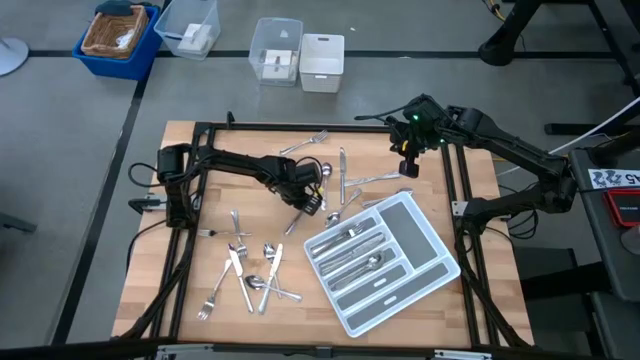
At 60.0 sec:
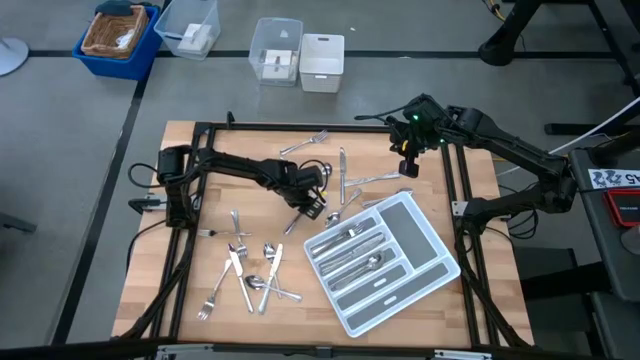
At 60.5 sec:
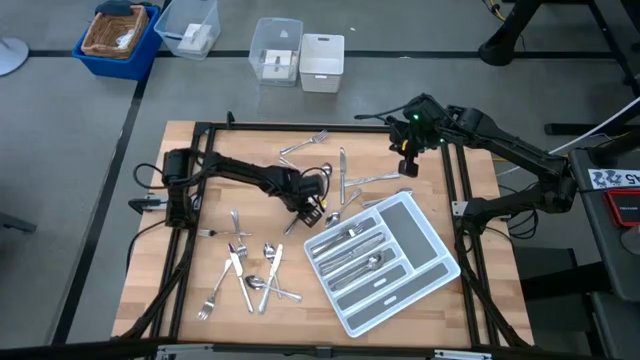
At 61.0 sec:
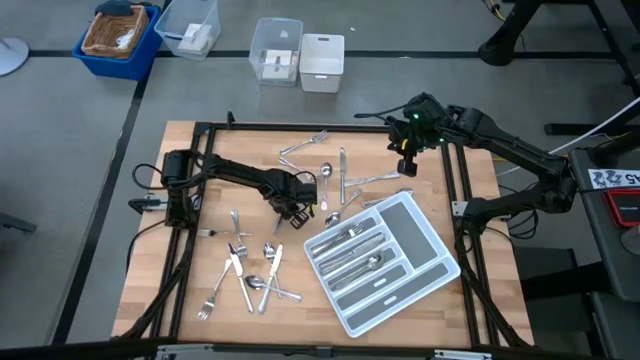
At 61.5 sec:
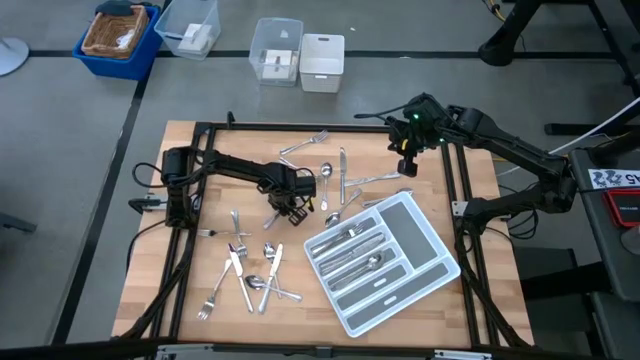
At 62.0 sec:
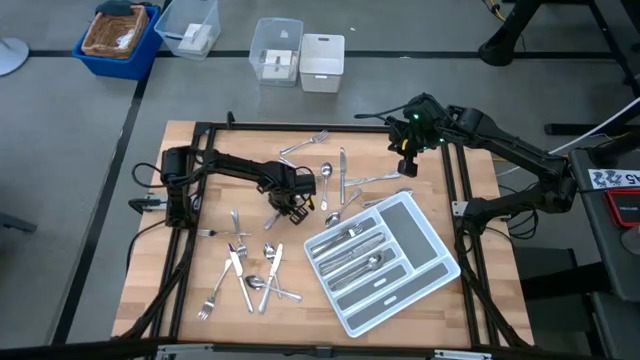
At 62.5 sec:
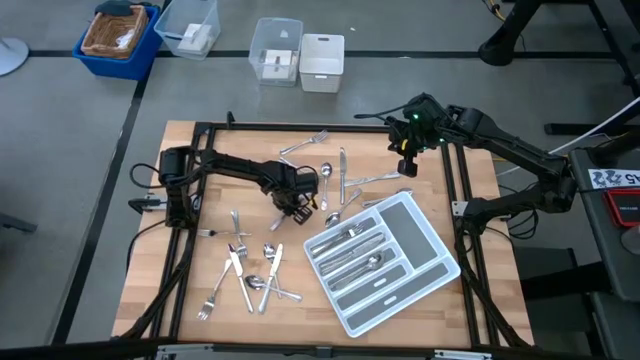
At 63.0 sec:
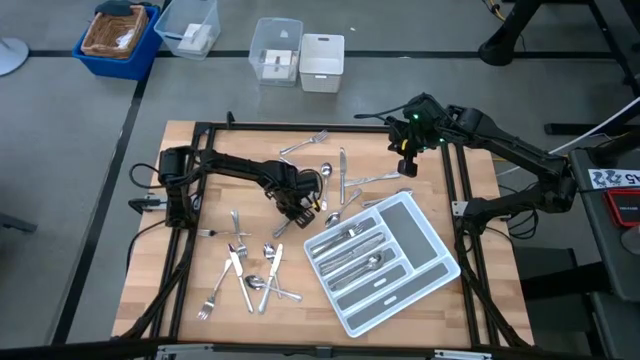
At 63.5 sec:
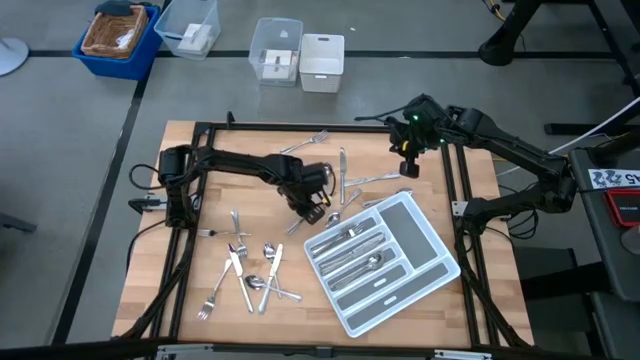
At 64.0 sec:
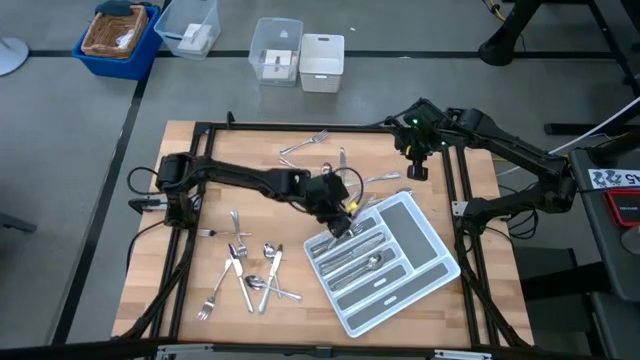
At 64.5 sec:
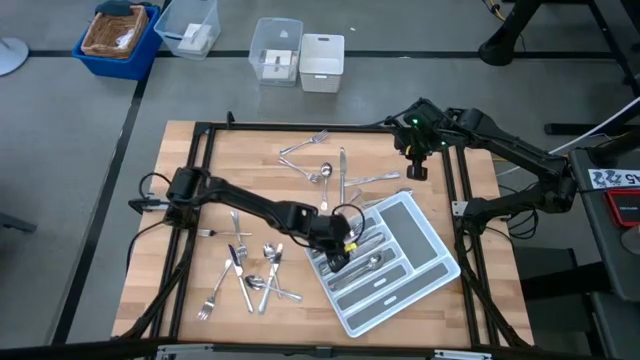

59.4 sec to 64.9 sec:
Task: Sort silverware
Put the silver table knife into the silverware tray

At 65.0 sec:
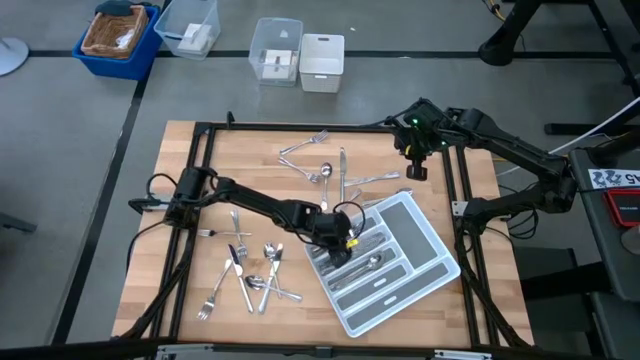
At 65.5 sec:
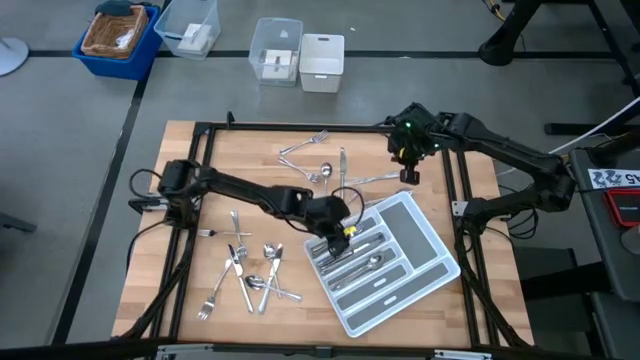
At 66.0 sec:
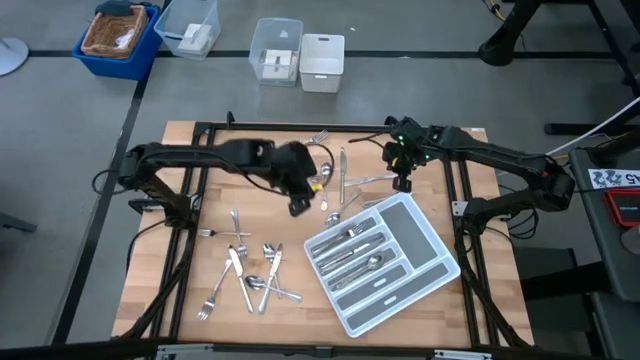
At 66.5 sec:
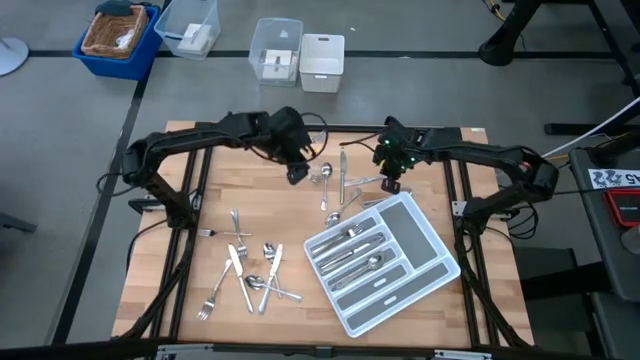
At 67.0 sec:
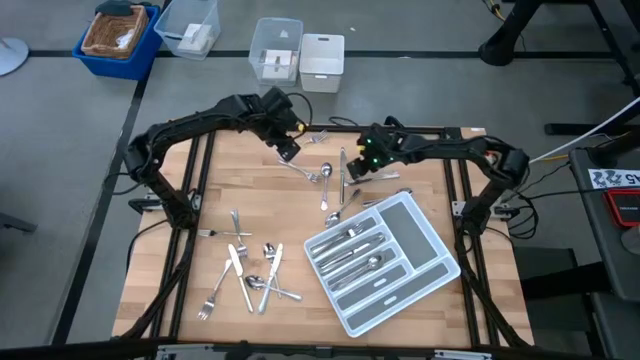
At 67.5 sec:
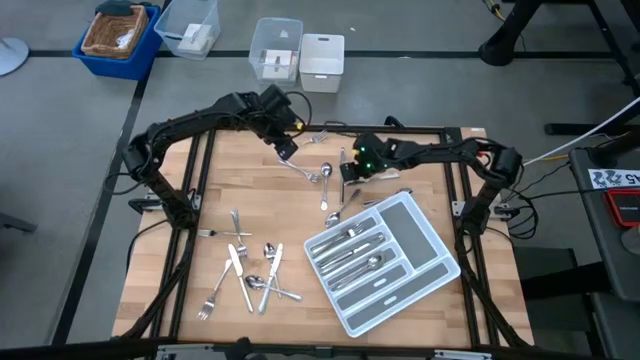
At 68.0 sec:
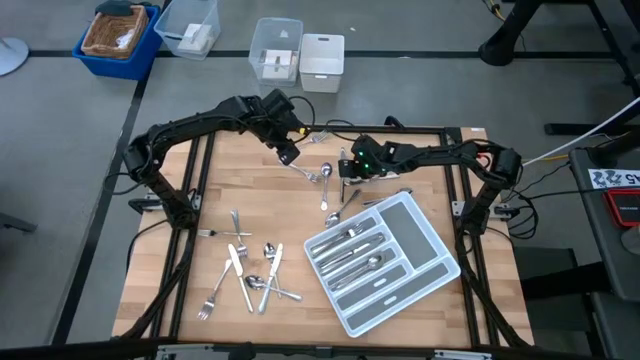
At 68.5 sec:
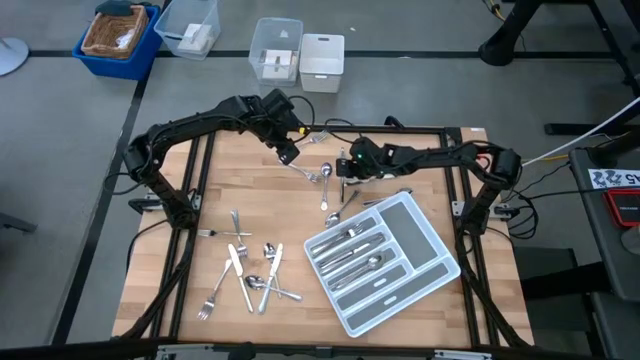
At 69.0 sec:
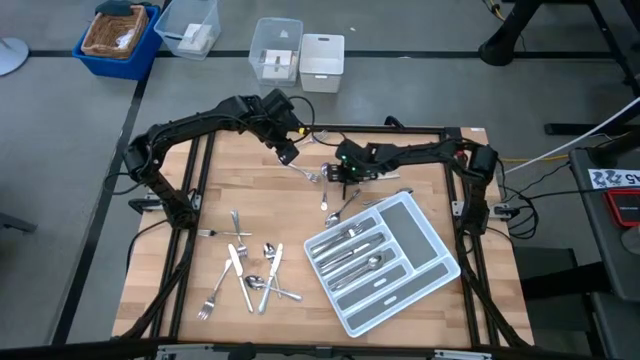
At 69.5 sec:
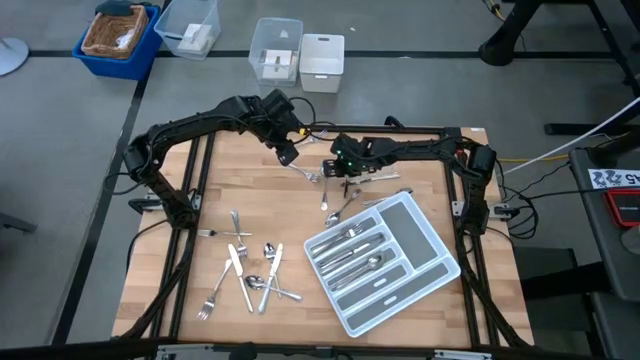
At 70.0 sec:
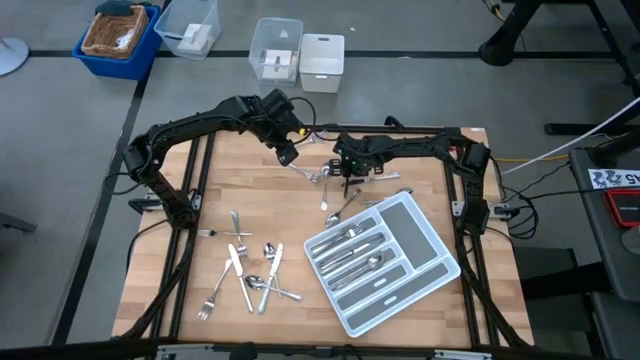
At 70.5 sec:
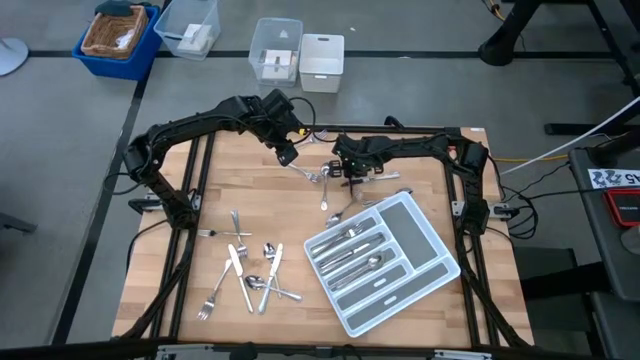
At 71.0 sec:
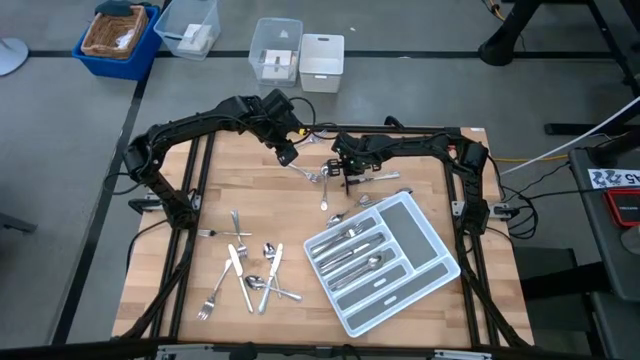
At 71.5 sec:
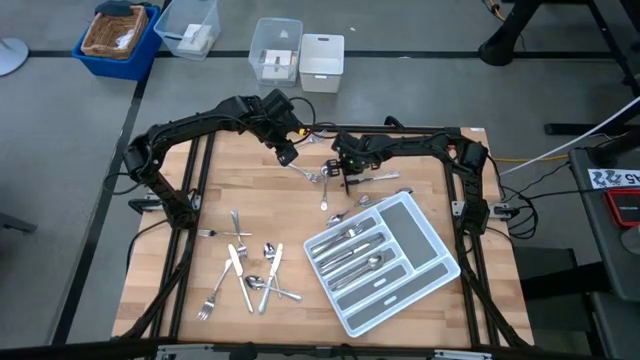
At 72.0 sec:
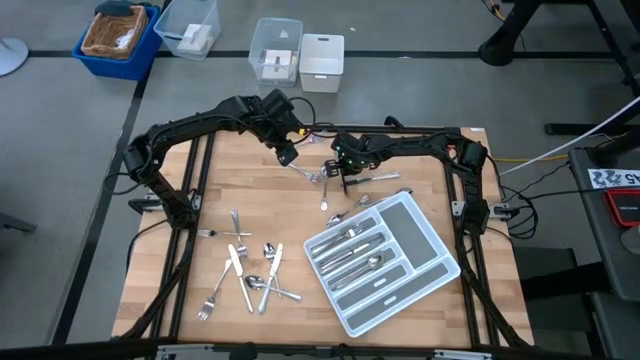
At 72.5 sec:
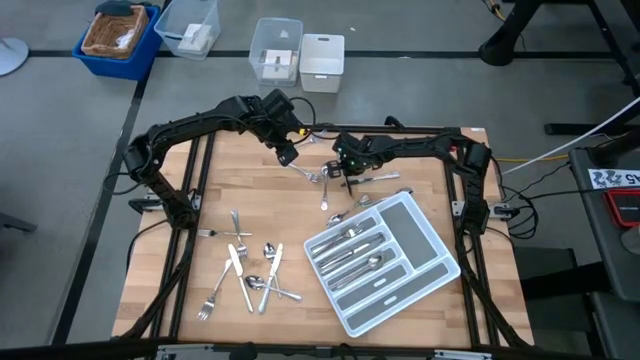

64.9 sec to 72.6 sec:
Put the silver table knife into the silverware tray

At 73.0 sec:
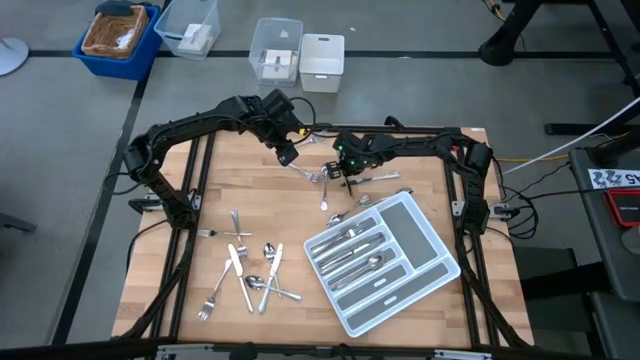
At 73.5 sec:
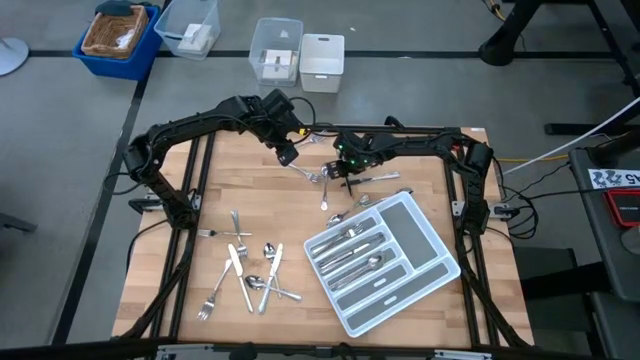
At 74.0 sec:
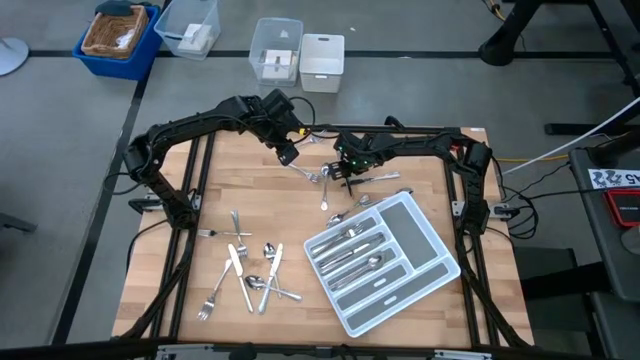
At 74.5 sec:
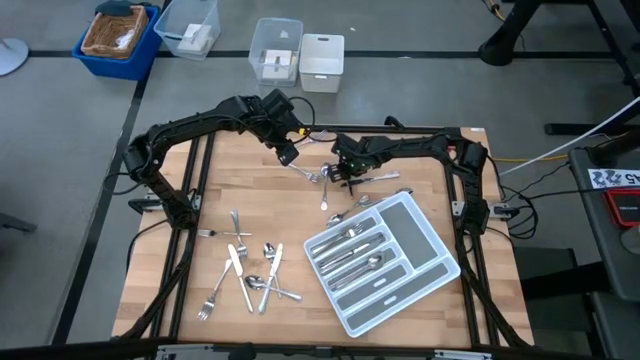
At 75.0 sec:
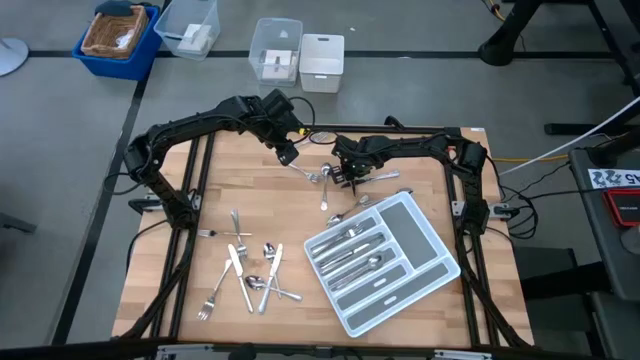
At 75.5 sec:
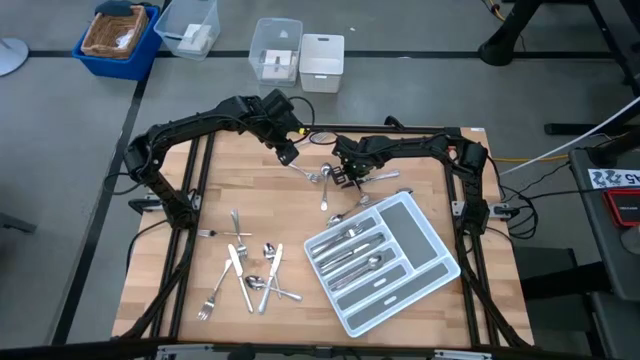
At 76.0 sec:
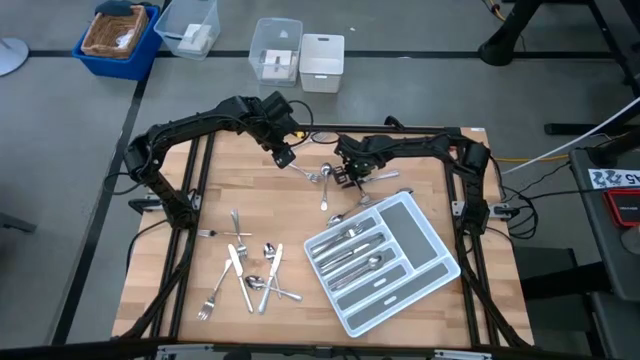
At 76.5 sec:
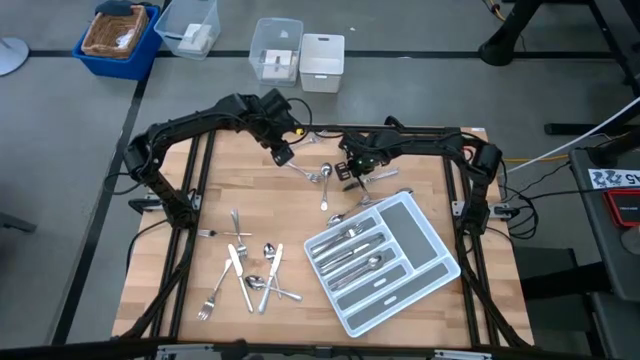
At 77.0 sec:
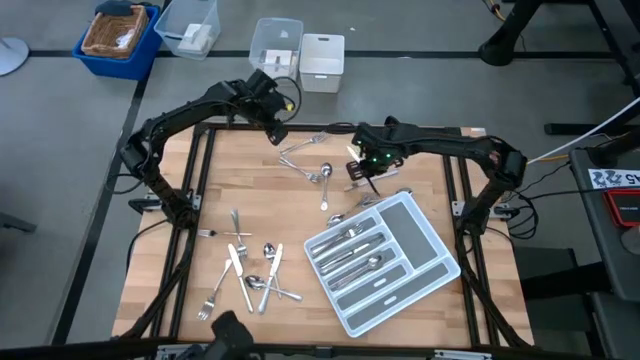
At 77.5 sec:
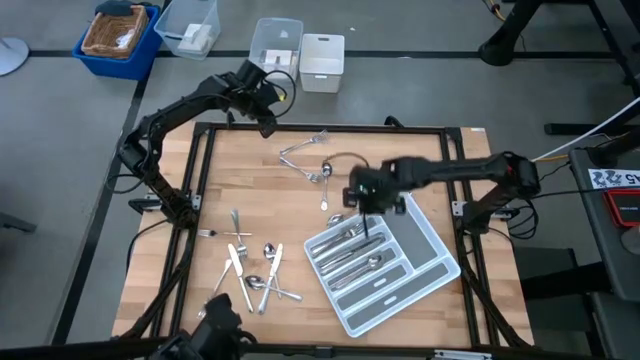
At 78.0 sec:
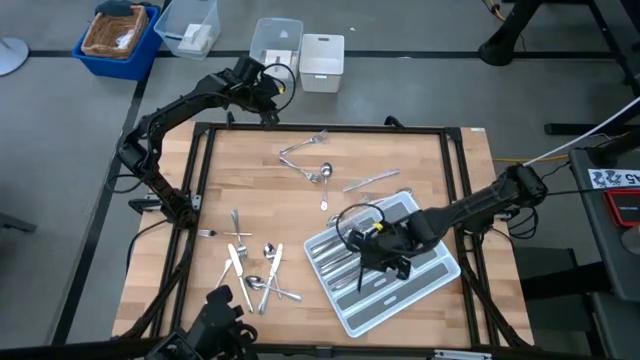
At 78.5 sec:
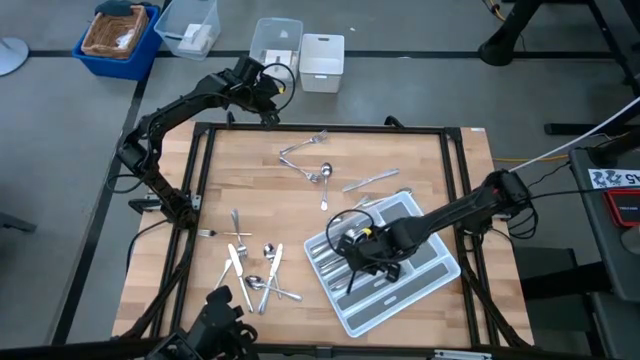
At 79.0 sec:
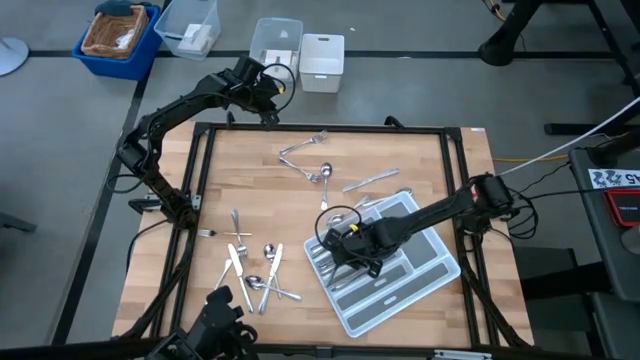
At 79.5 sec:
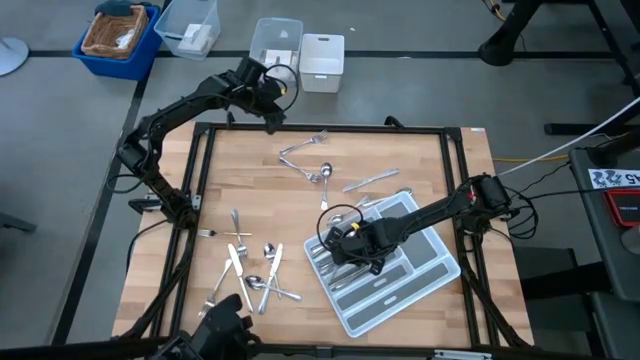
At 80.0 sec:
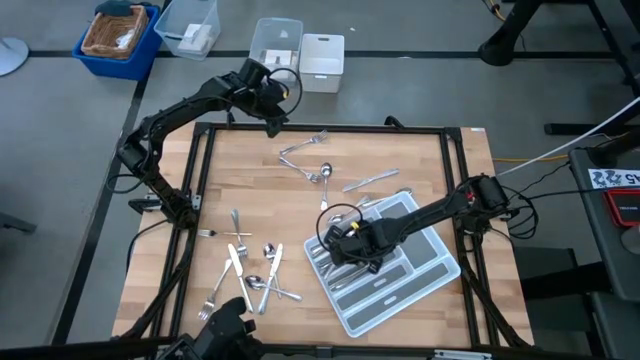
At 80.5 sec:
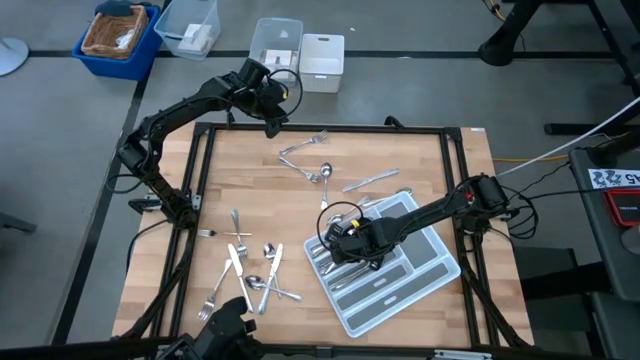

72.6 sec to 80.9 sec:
Put the silver table knife into the silverware tray
